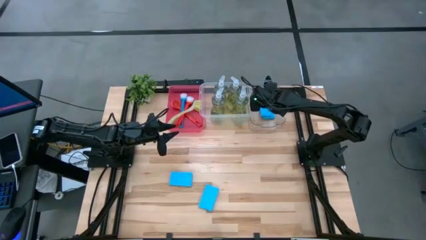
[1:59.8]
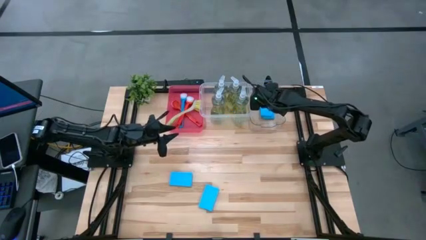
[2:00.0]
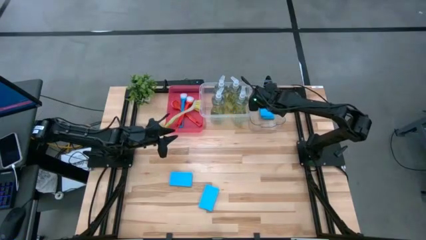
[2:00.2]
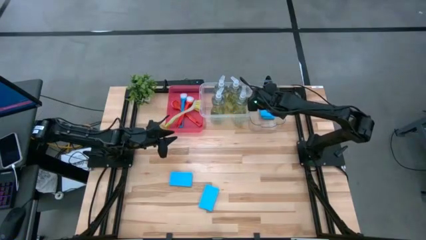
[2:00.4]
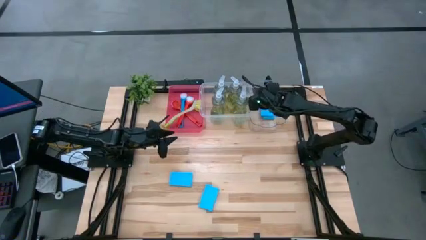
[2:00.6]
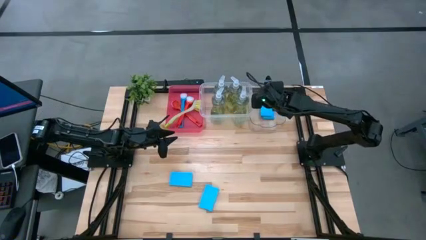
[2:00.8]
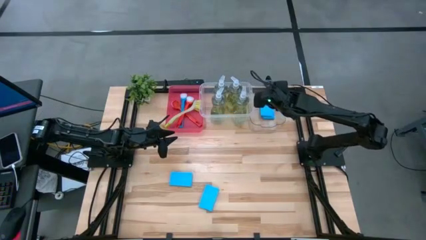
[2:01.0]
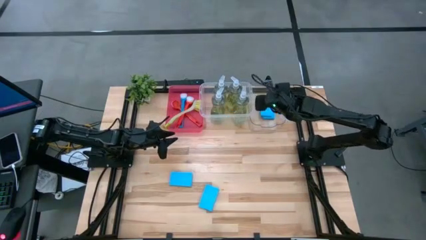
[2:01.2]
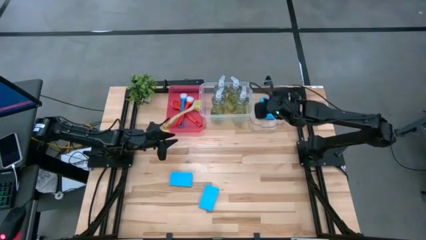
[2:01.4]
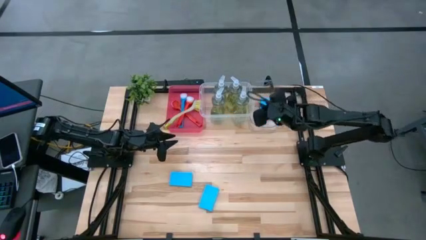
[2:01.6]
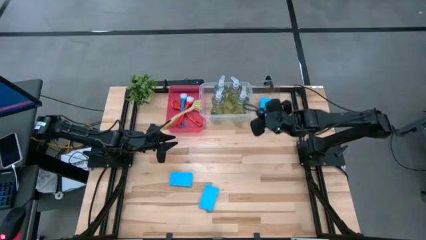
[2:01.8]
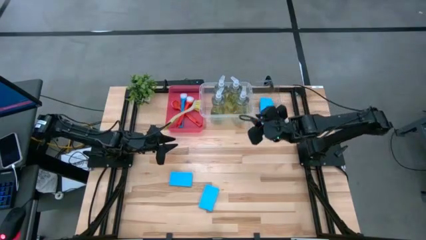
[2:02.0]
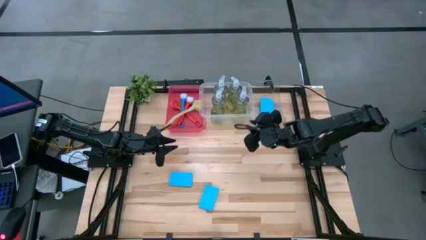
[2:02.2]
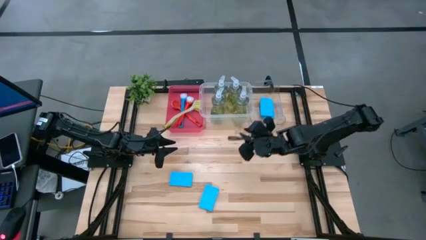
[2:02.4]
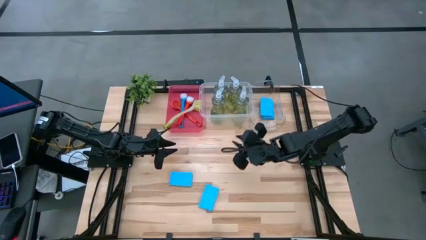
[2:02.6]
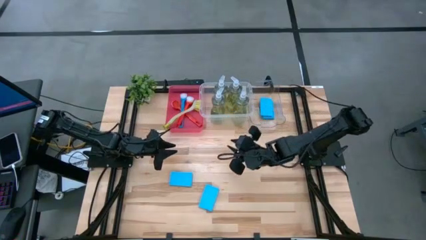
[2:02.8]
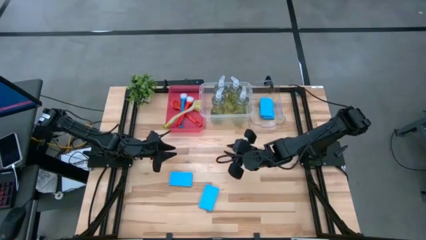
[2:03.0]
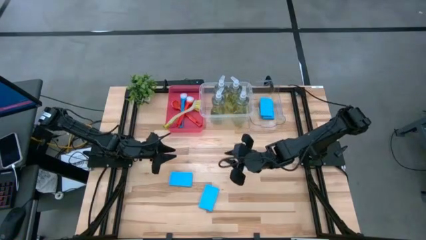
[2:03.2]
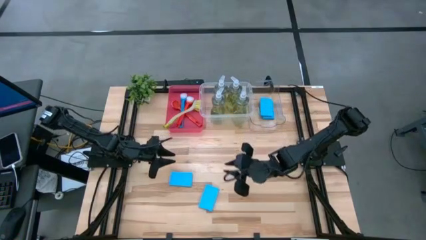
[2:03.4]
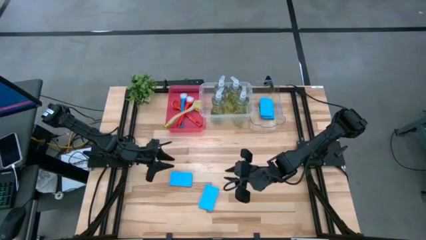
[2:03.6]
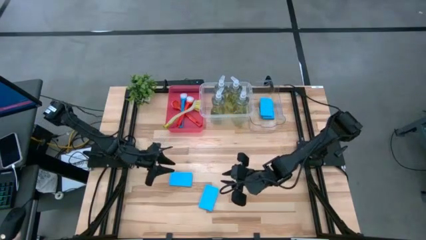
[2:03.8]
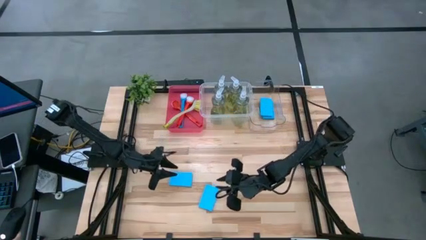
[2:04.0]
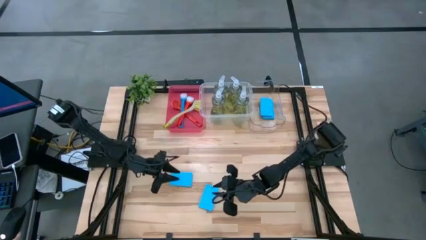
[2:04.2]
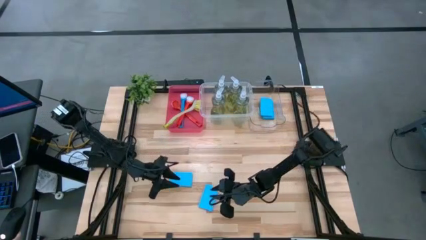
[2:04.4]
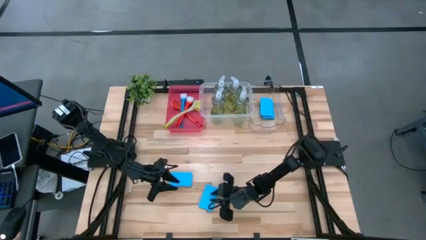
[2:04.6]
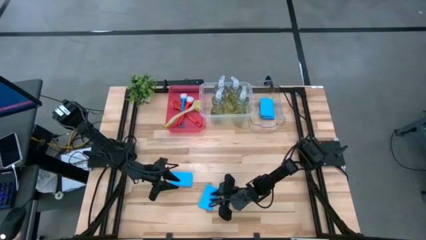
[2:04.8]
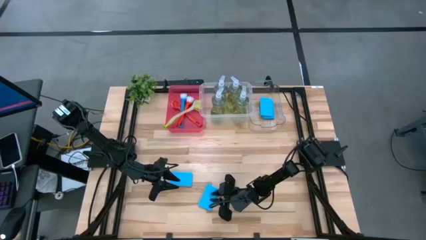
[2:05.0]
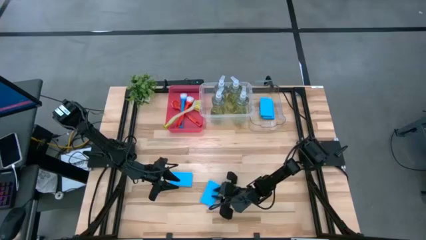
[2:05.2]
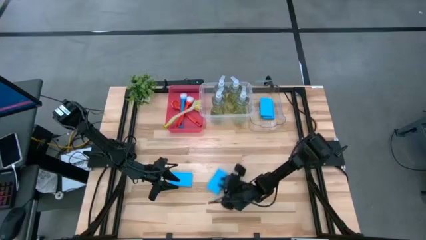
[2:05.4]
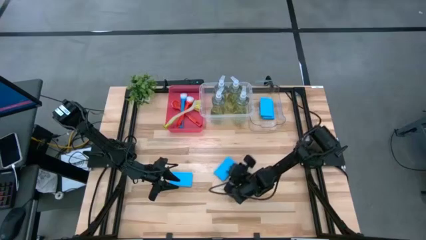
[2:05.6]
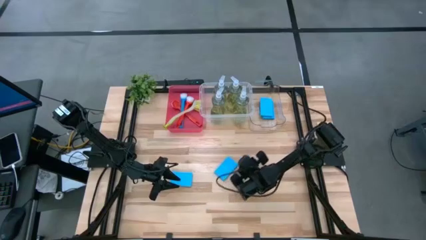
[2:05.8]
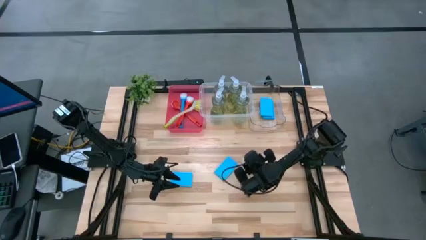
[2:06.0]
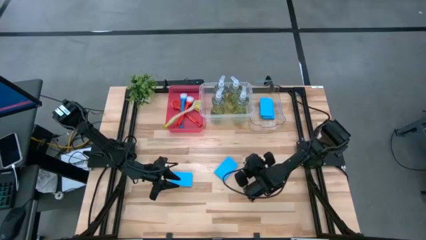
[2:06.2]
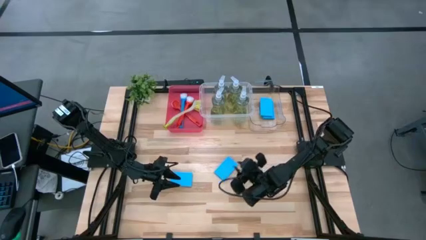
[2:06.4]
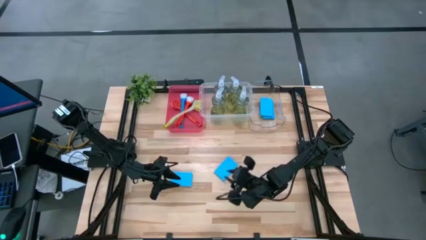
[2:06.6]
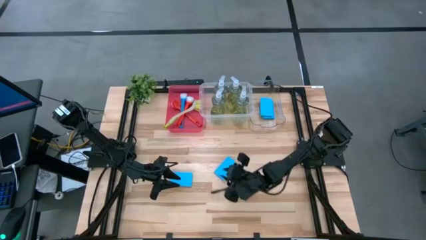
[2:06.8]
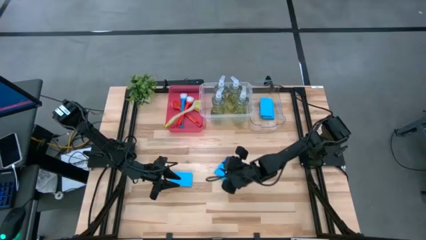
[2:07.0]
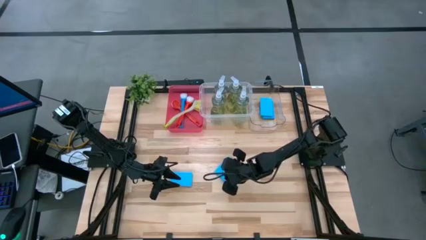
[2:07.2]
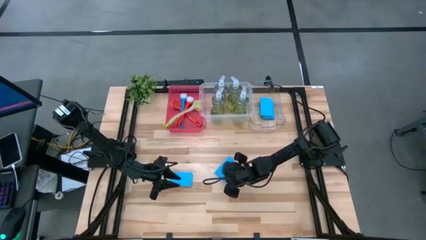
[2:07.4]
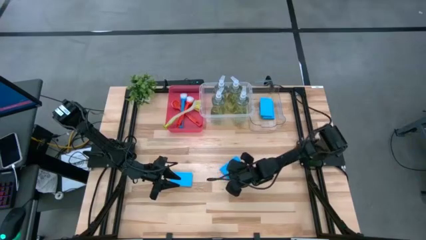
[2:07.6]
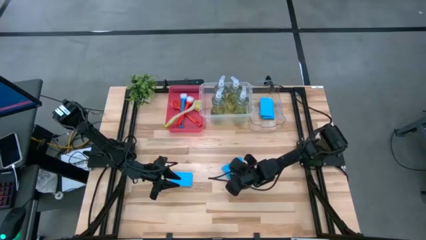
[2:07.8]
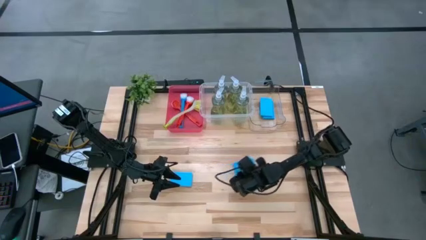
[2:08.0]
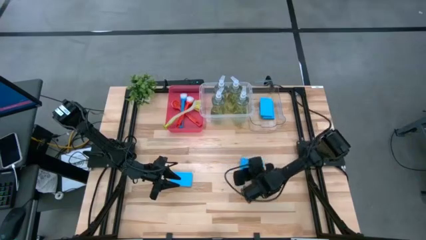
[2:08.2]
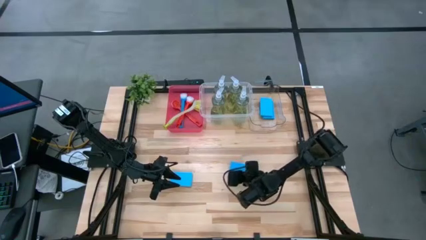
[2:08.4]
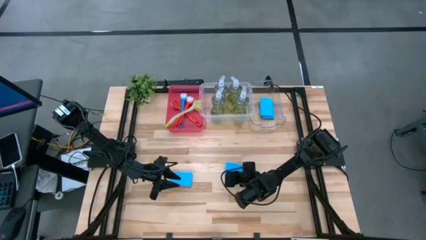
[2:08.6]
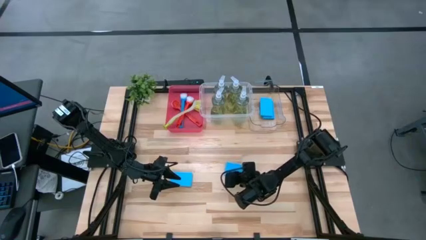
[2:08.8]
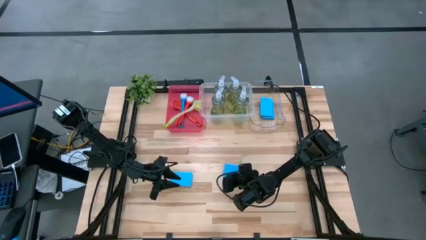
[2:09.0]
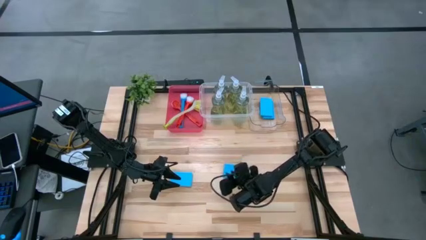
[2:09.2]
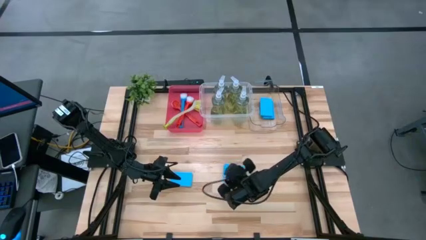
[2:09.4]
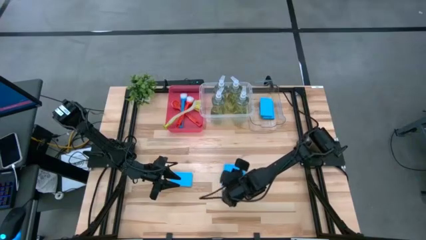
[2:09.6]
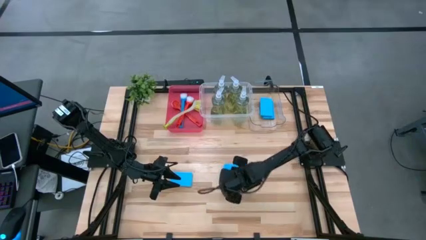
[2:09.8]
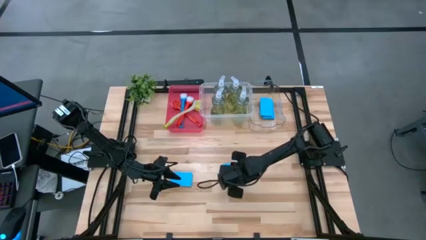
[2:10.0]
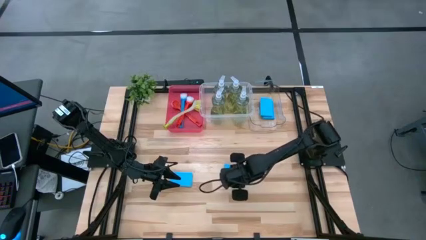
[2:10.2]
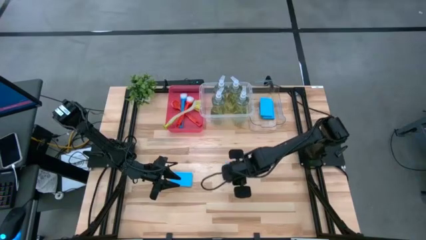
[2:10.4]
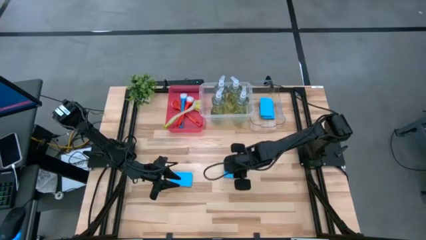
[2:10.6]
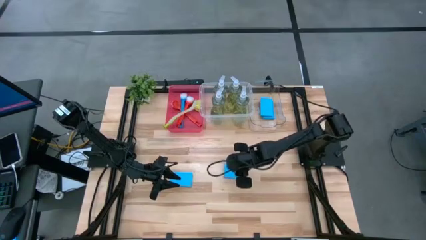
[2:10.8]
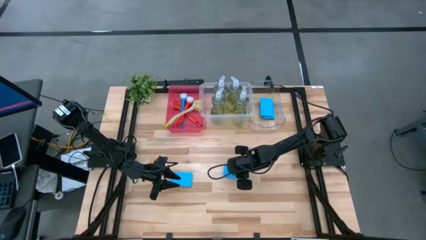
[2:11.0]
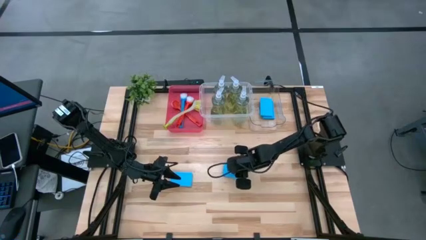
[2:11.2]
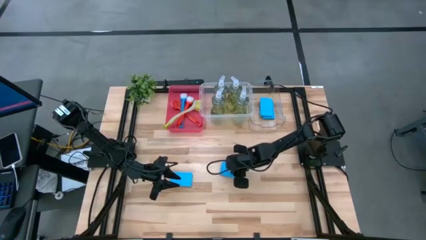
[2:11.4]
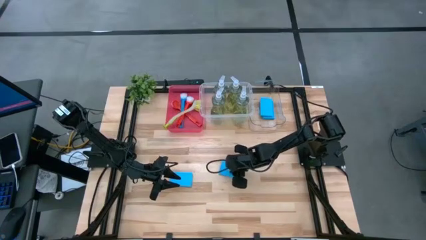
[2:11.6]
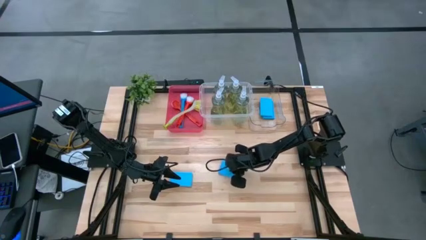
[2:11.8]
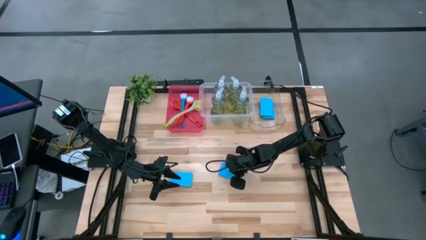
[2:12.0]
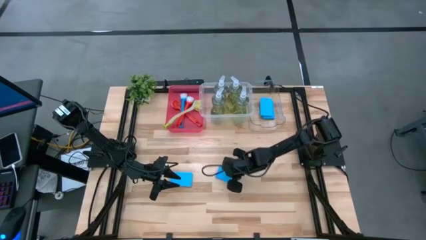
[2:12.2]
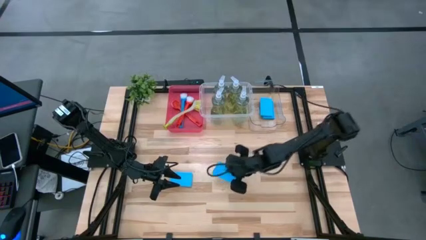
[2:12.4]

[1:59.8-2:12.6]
Task: Pick & Place Kitchen Sink Supplies
Put the blue dishwashing sponge into the transparent bin

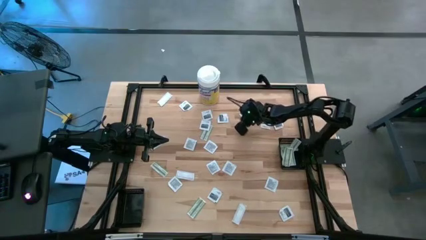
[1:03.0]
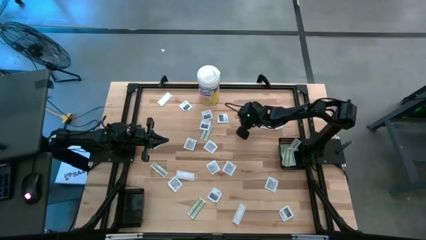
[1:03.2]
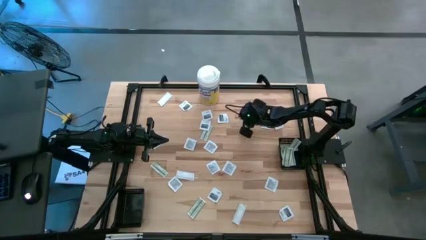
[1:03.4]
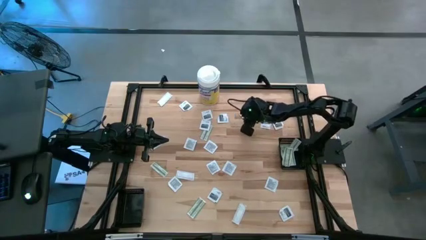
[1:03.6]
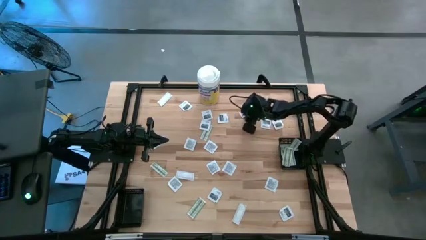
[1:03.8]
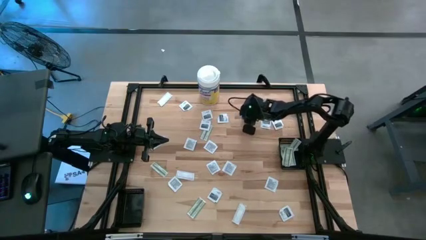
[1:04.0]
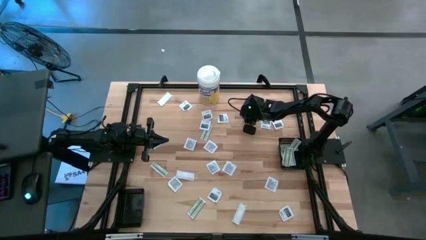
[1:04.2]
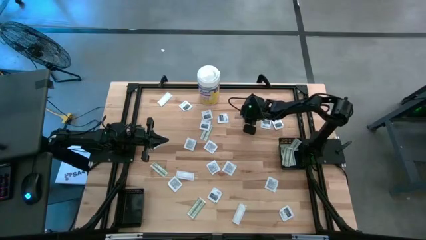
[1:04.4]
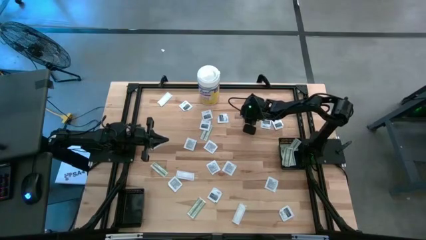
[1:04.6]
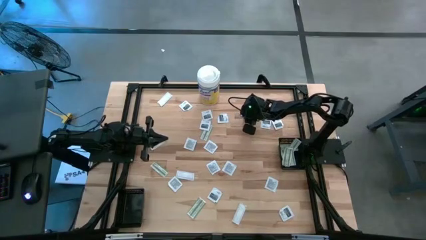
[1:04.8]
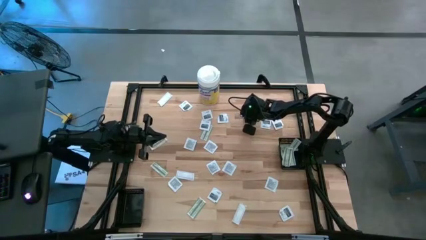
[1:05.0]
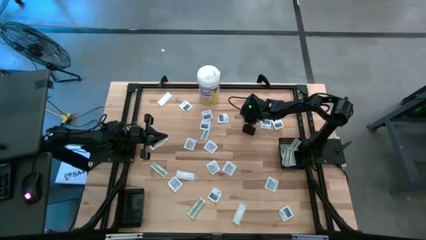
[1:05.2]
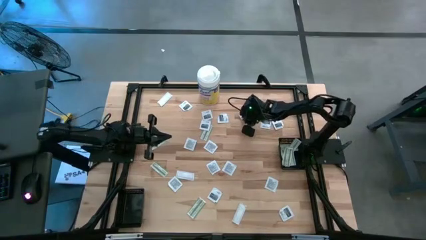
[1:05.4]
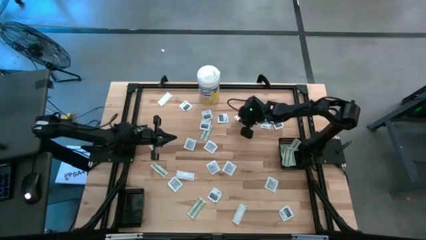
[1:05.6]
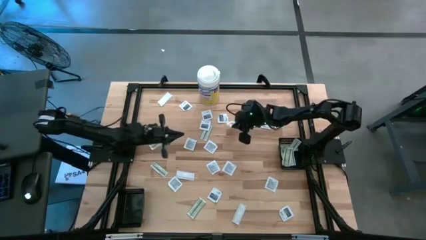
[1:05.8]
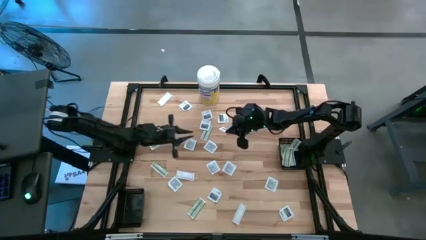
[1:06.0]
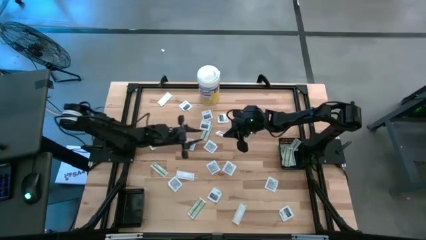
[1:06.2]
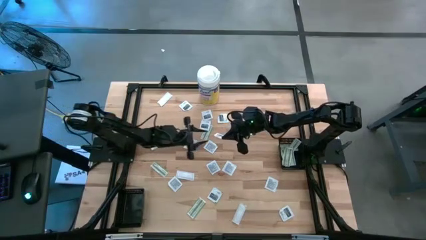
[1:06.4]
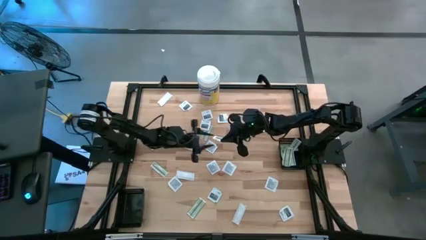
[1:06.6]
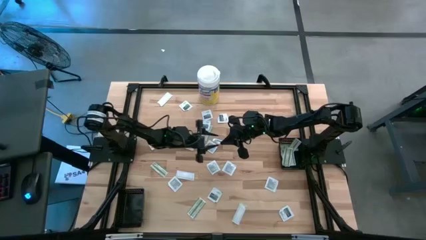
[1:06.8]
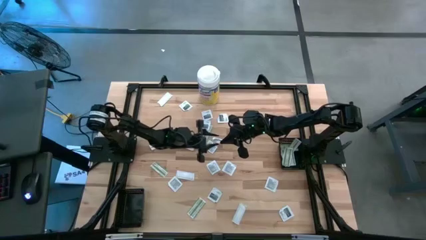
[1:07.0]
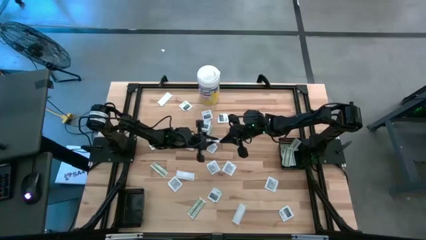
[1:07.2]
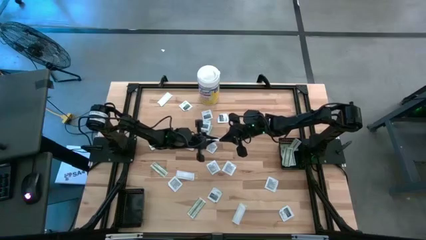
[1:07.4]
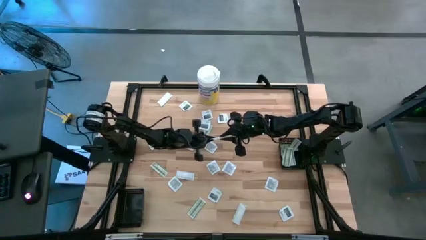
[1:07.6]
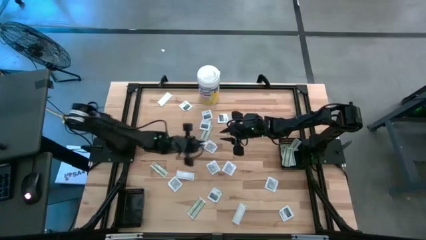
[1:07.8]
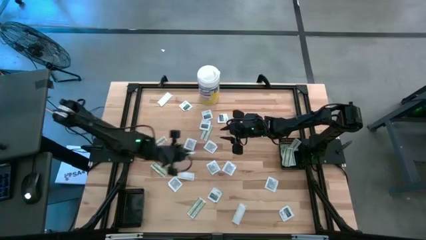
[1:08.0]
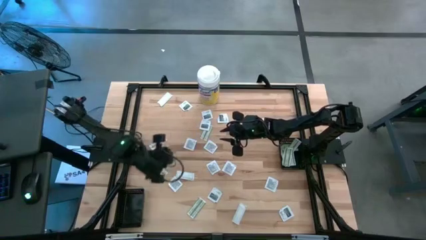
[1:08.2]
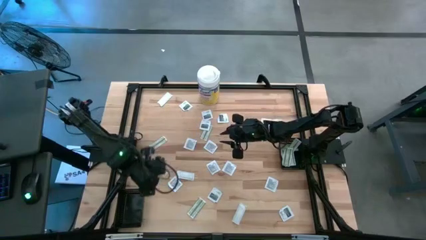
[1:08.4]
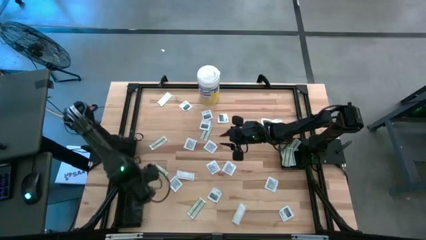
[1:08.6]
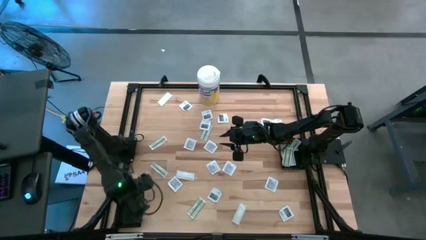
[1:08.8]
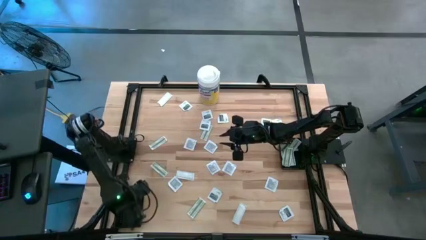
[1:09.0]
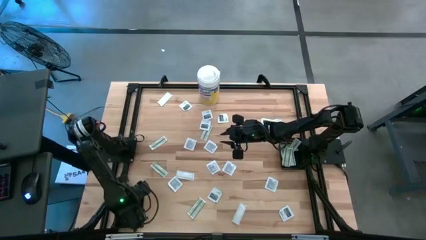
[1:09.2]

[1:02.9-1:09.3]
Task: Pick & Place First Aid Supplies
Put the white towelette sachet into the left black bin
